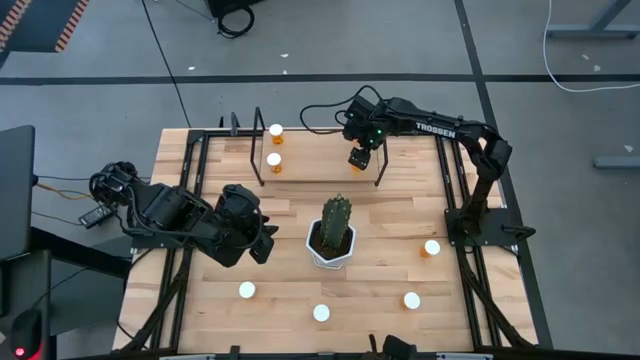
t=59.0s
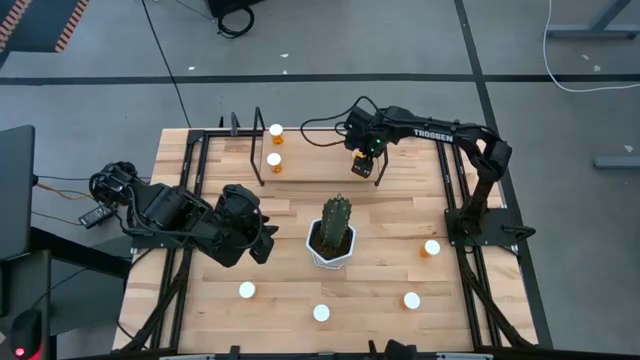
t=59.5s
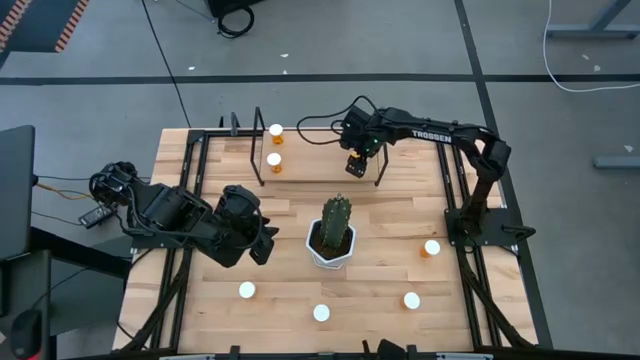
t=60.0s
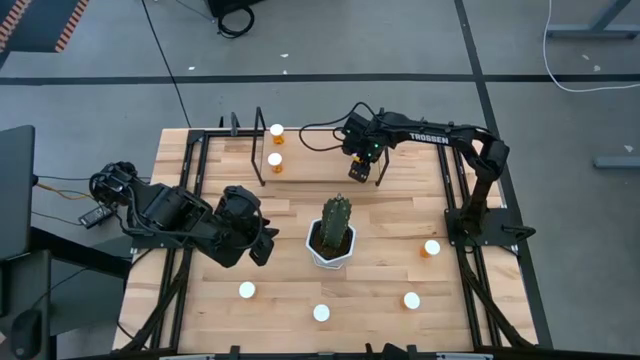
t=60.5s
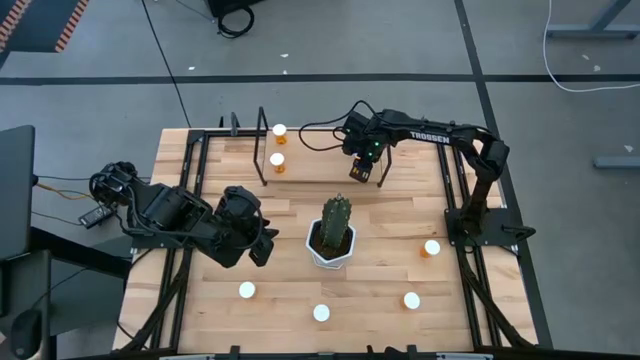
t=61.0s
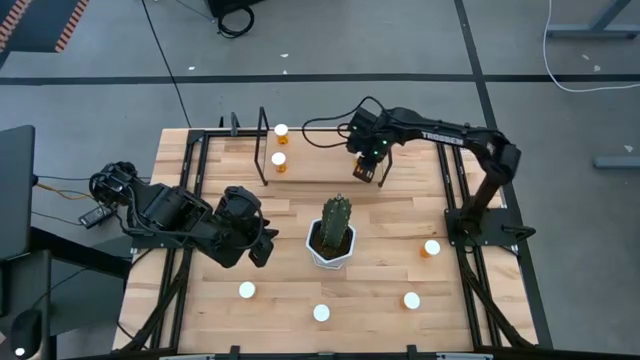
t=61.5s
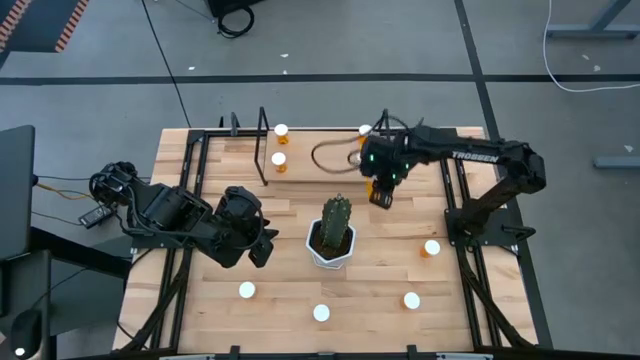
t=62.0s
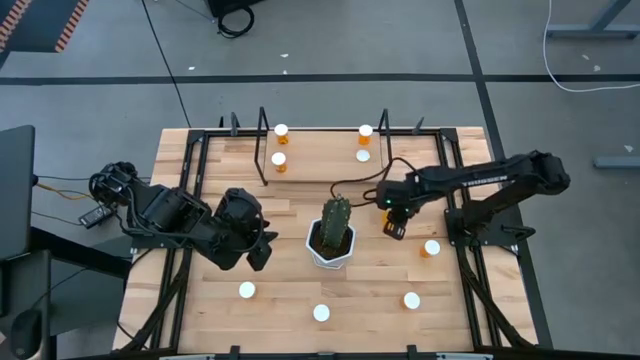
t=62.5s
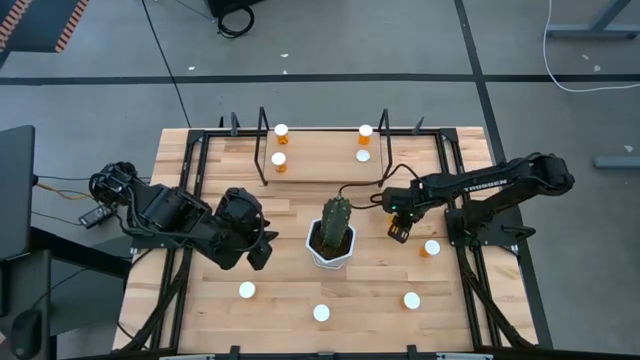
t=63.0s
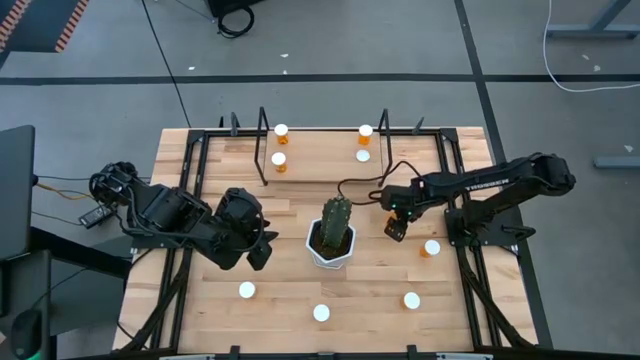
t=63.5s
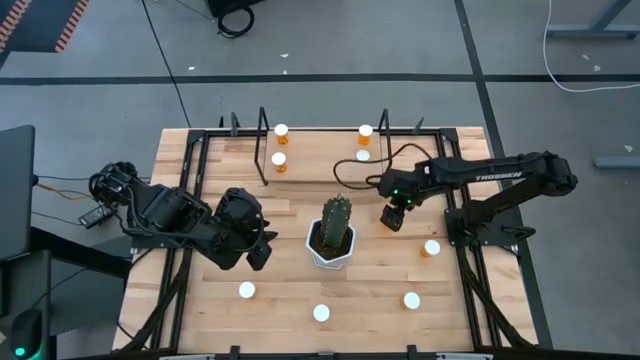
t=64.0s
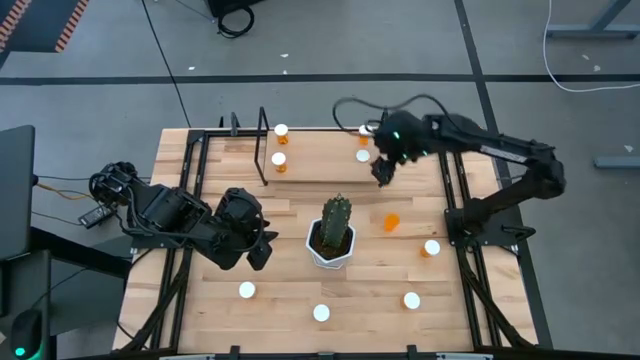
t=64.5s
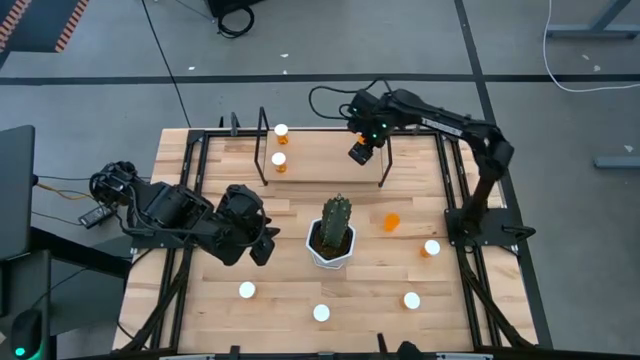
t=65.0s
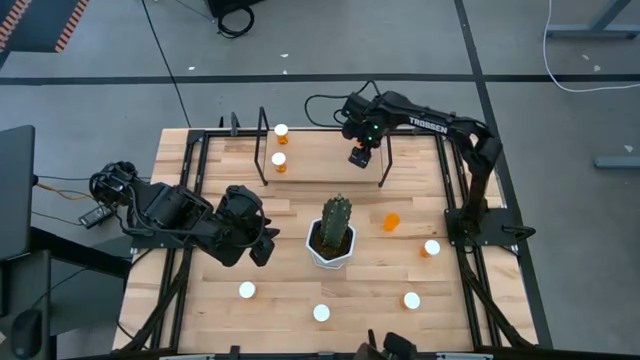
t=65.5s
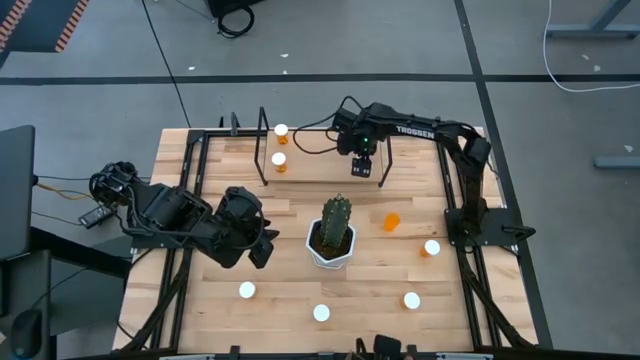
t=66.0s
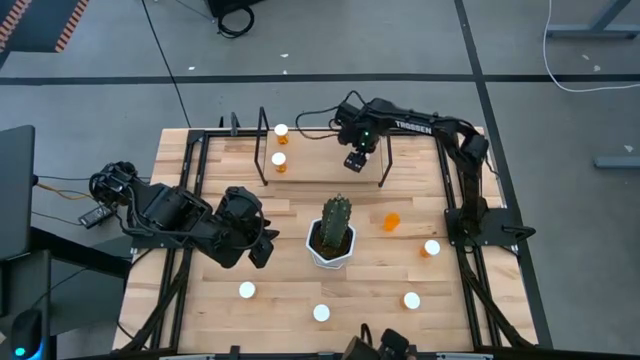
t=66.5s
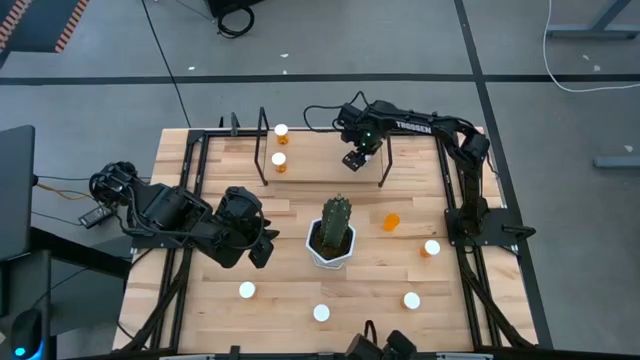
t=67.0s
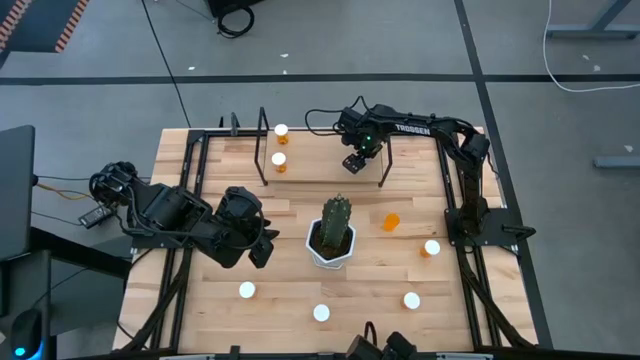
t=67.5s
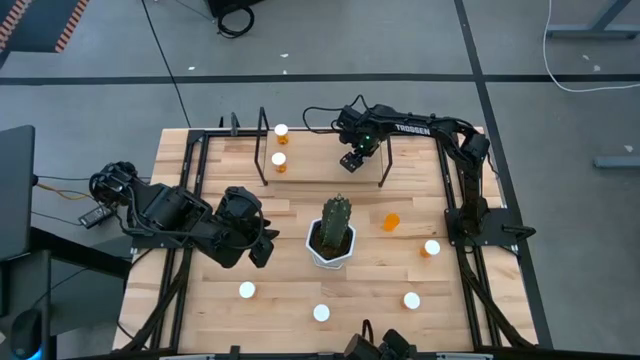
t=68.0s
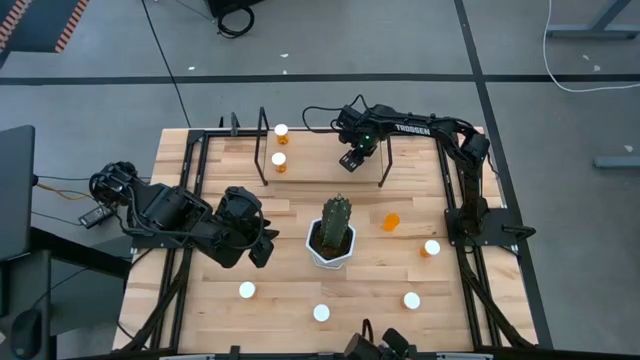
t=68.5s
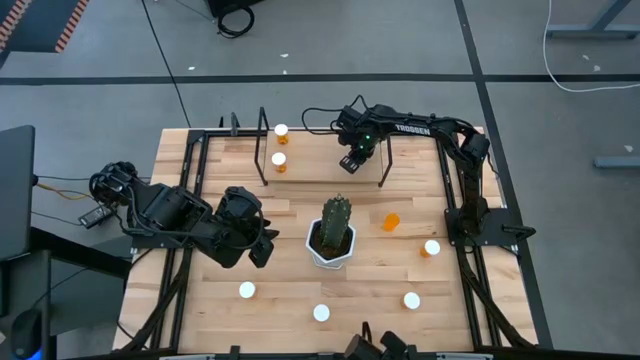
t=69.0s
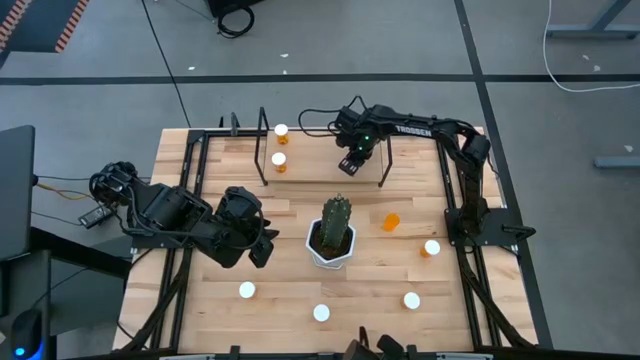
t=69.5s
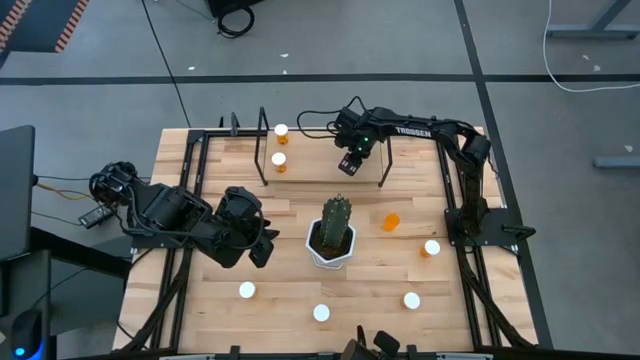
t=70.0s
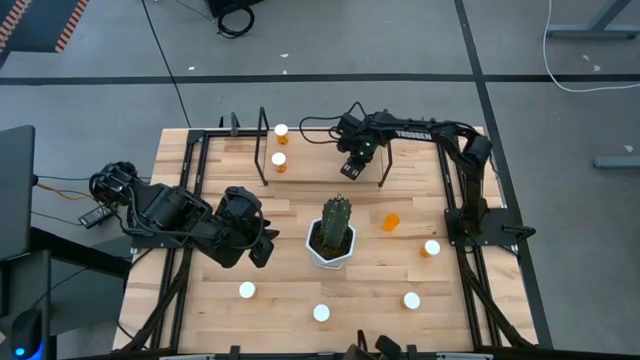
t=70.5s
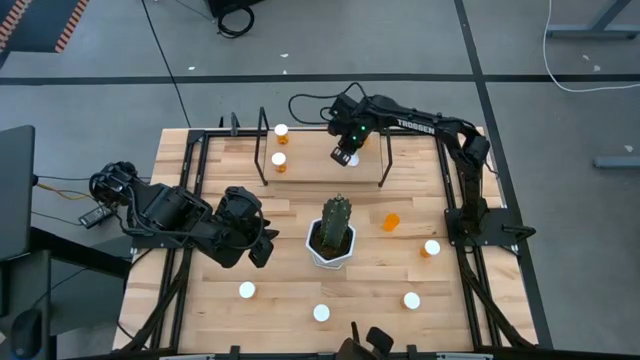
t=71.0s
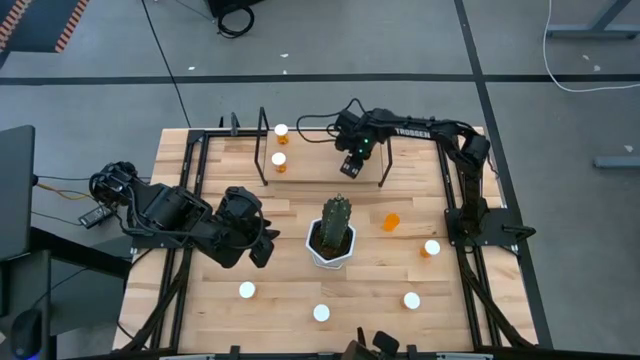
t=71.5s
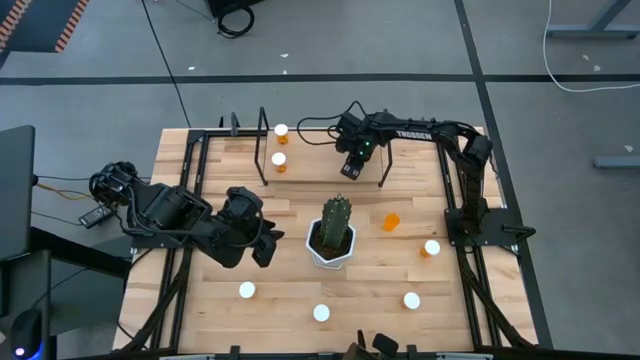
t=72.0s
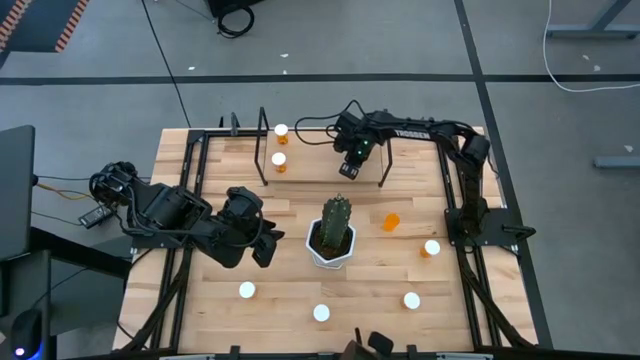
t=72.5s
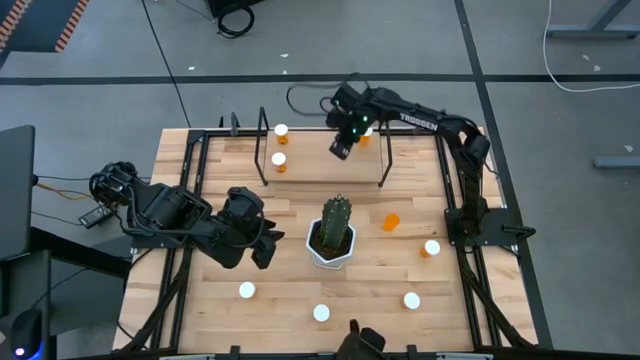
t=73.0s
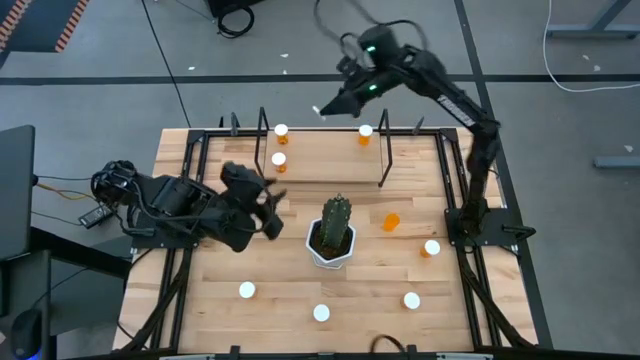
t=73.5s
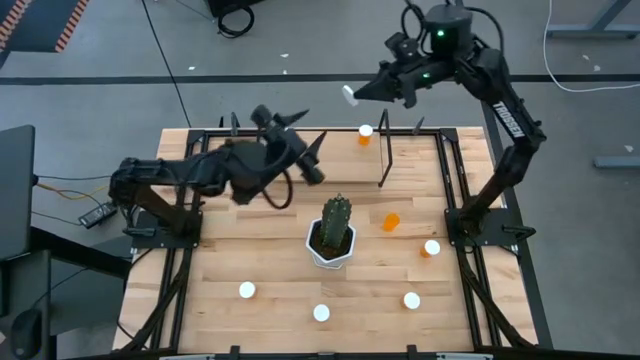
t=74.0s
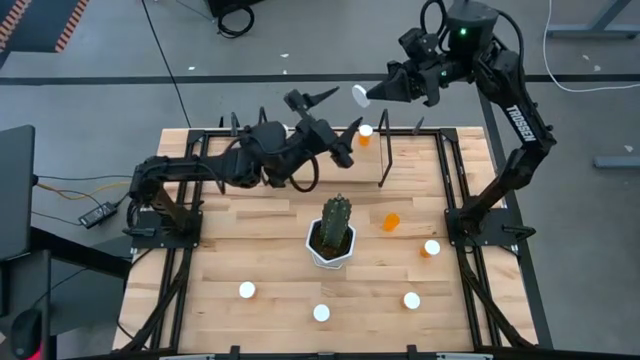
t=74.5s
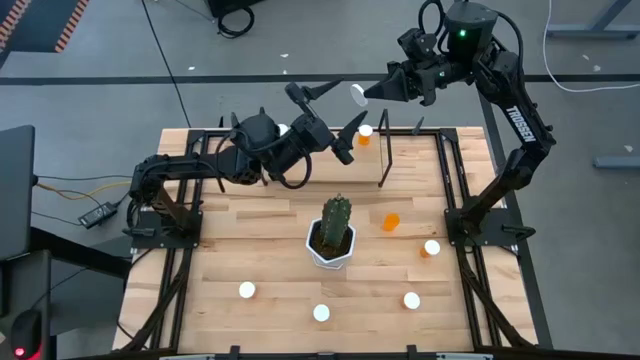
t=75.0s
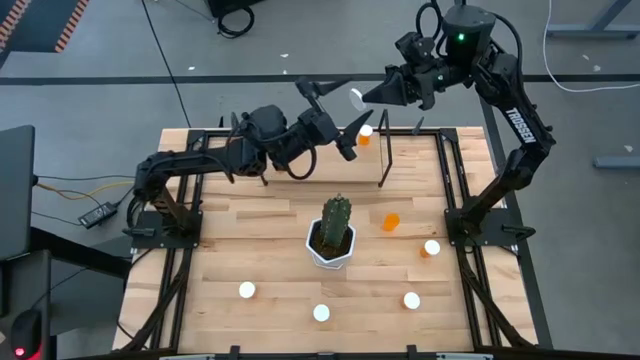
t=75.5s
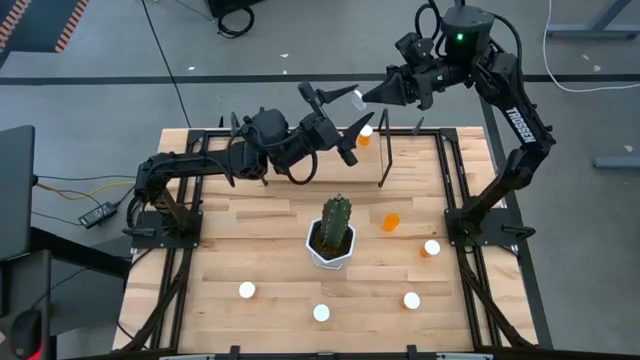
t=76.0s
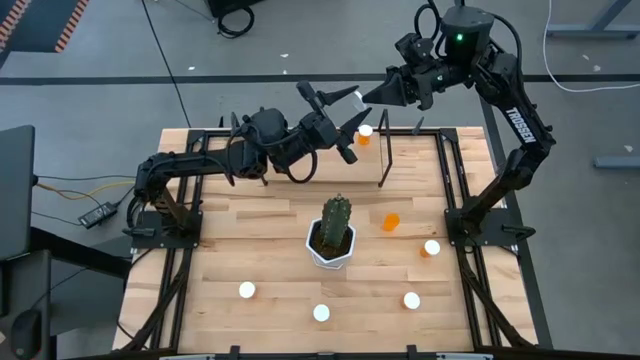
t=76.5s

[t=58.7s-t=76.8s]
Task: Pick and place medicine bottles onto shelf by color
Put the orange medicine bottle on the shelf

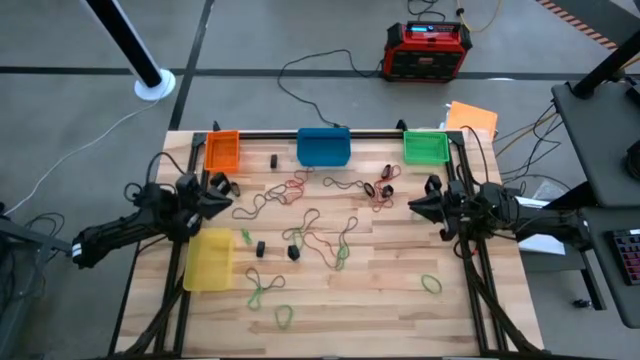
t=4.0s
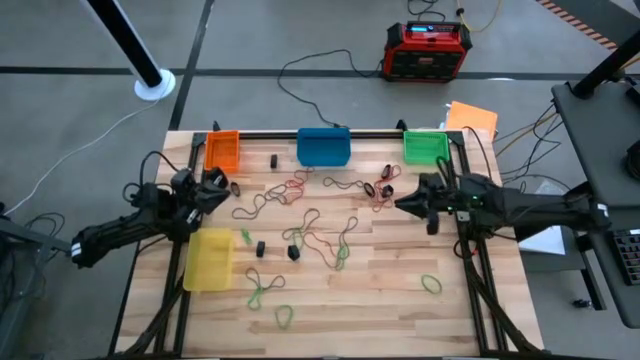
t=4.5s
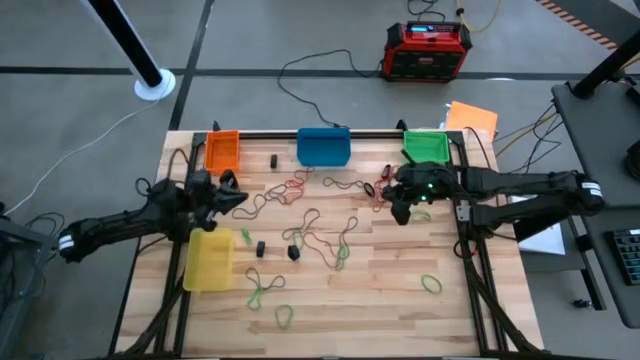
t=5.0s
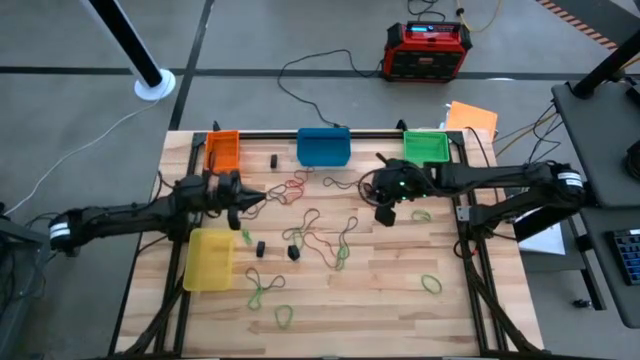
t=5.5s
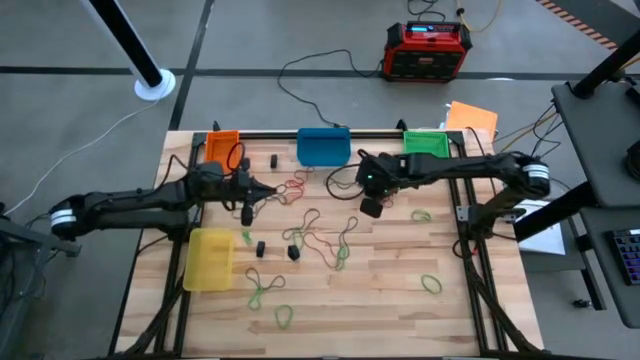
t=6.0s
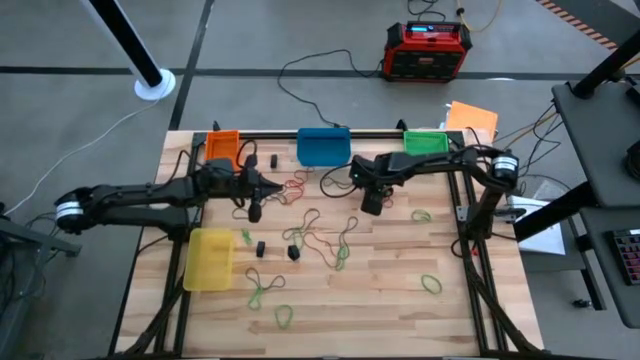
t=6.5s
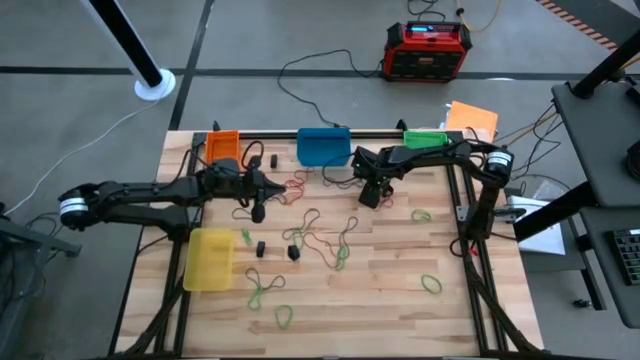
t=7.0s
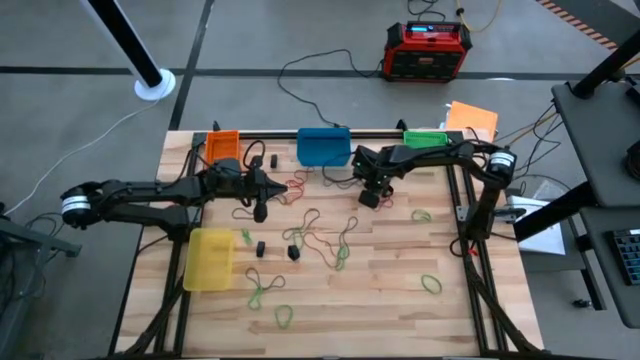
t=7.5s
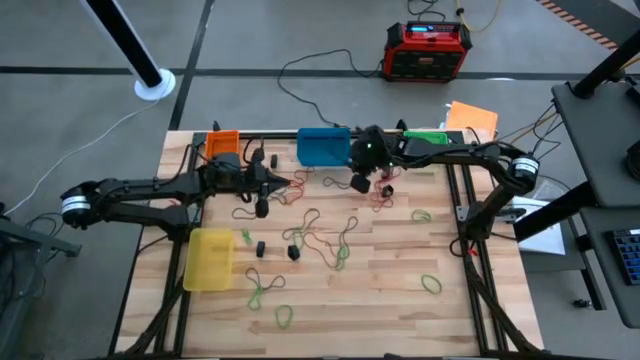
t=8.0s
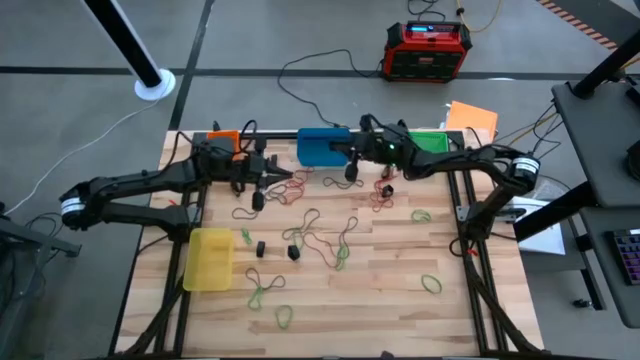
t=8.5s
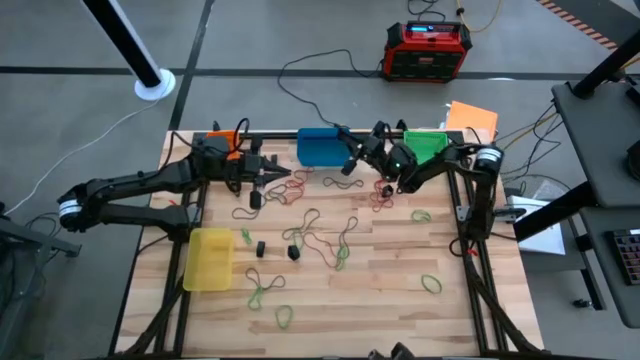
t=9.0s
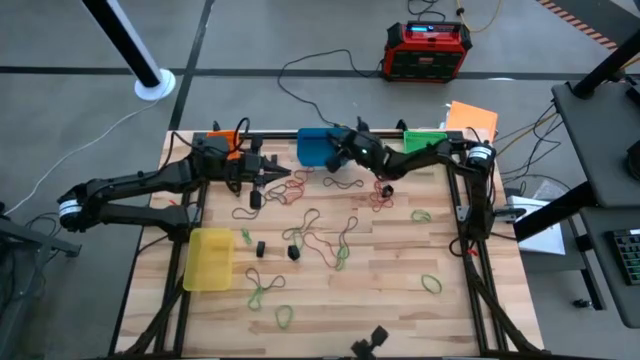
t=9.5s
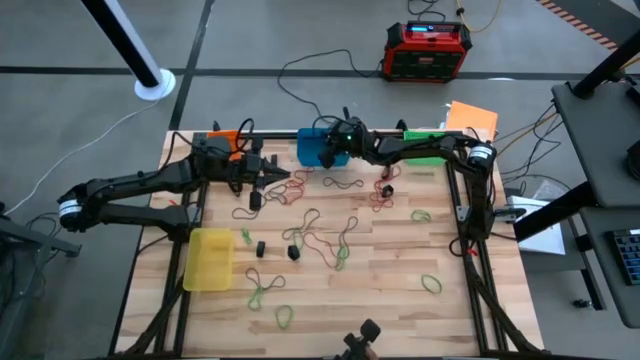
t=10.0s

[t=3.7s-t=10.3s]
Task: Sort rubber bands into baskets
Put the black rubber band into the blue bin
